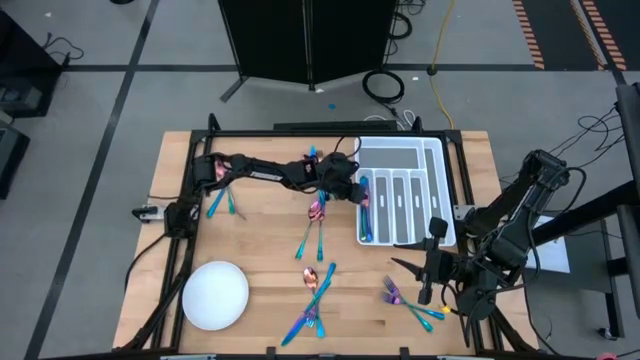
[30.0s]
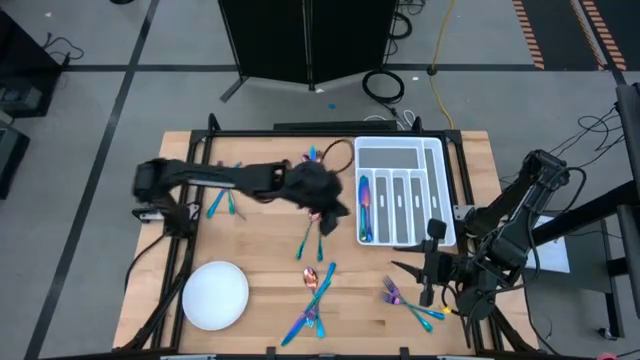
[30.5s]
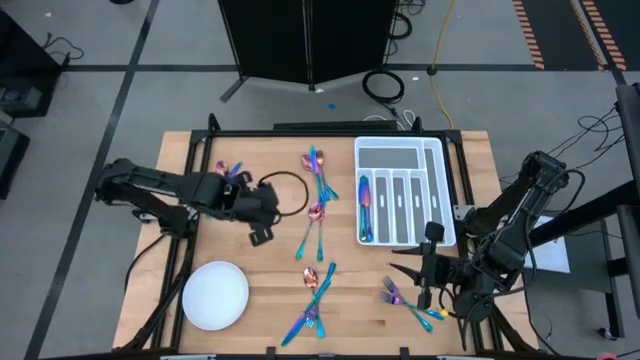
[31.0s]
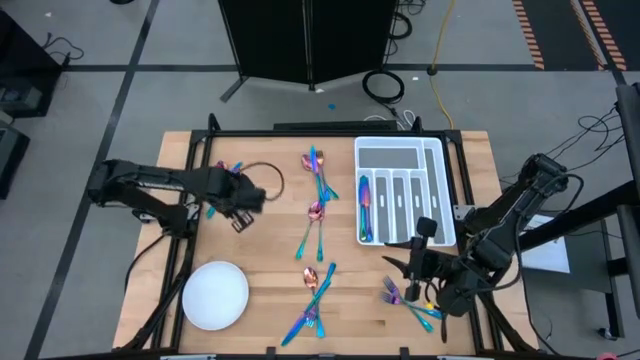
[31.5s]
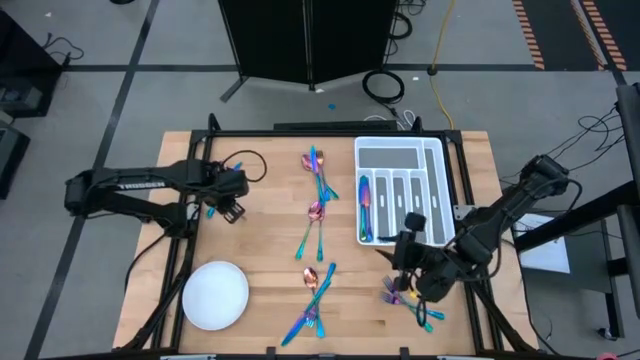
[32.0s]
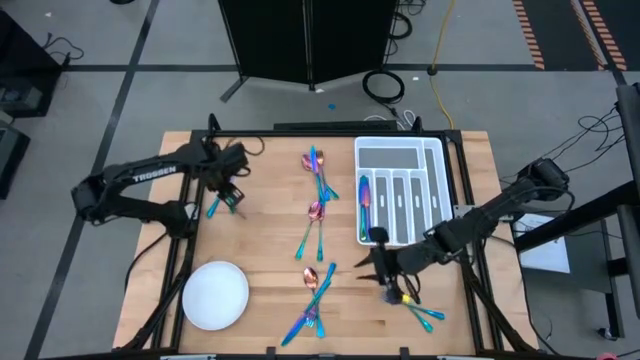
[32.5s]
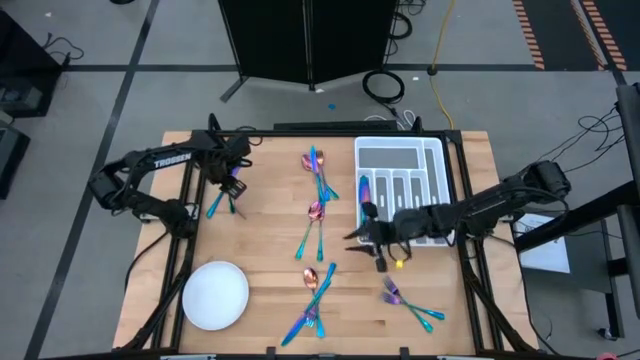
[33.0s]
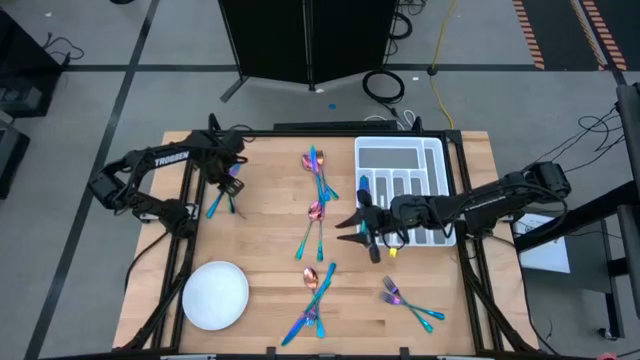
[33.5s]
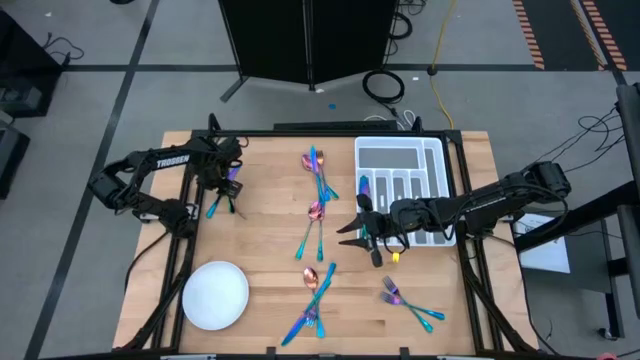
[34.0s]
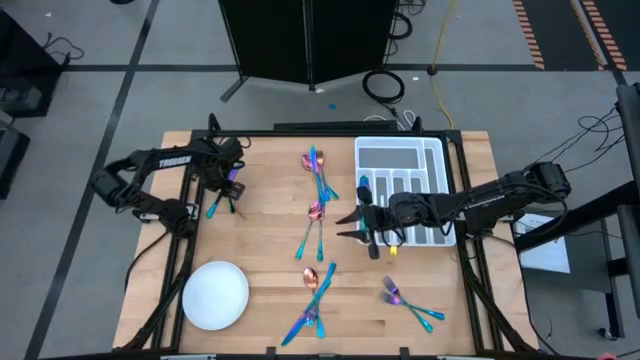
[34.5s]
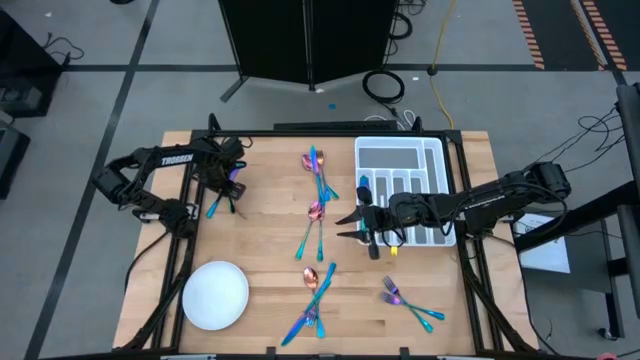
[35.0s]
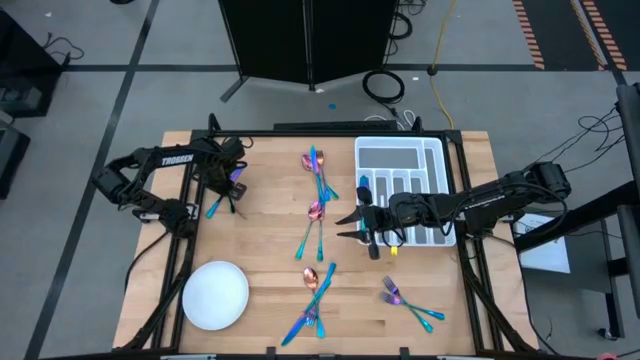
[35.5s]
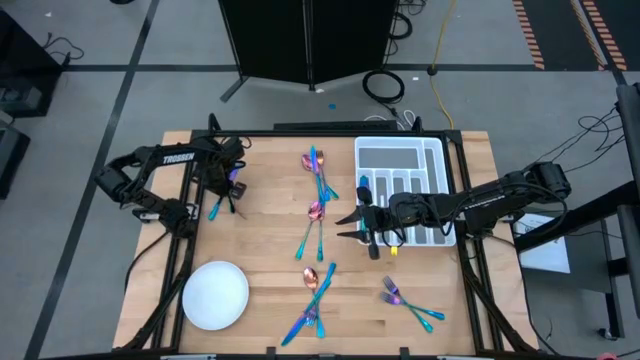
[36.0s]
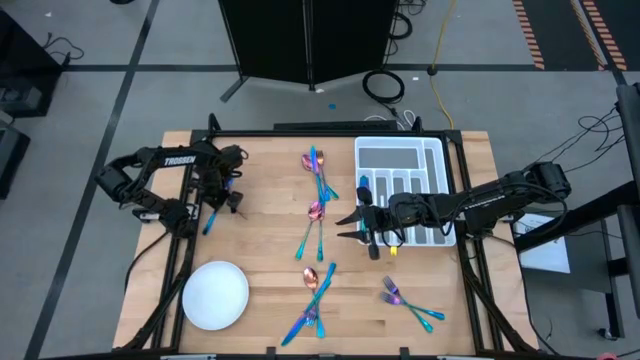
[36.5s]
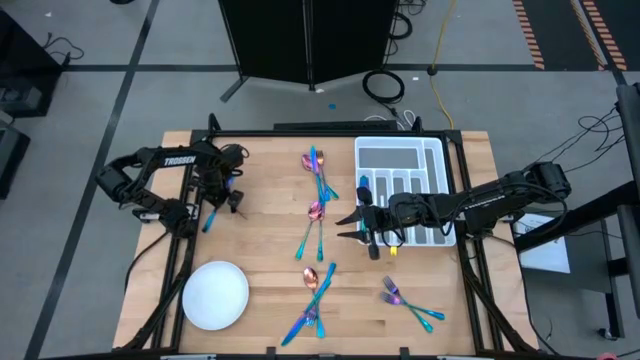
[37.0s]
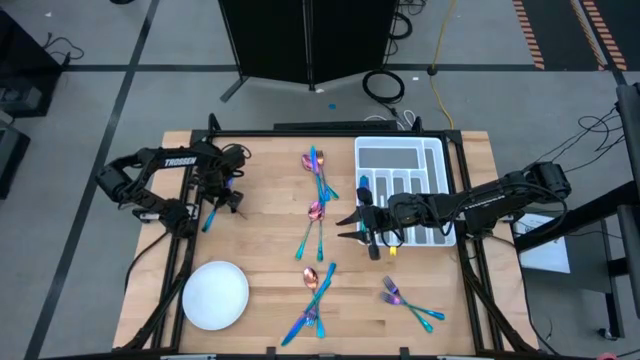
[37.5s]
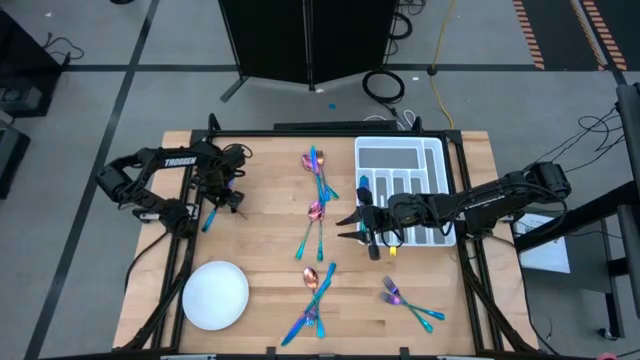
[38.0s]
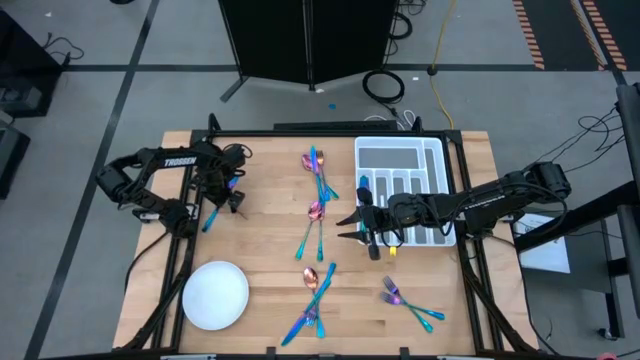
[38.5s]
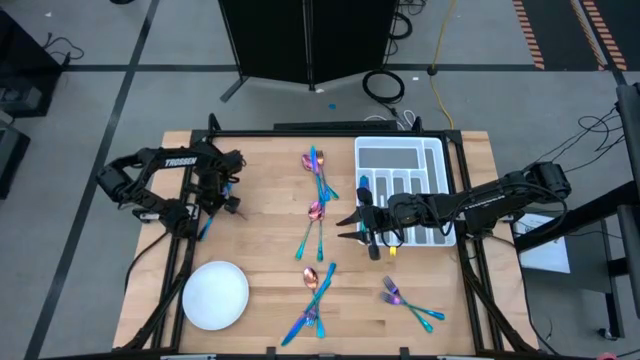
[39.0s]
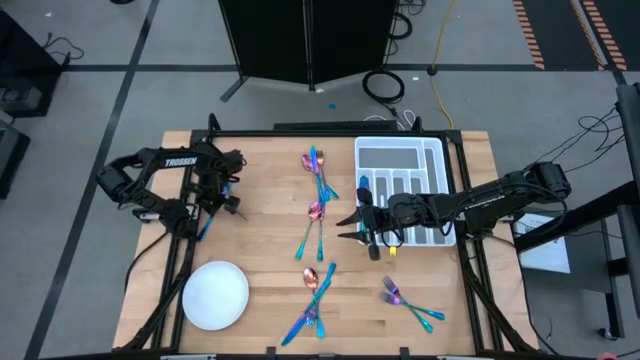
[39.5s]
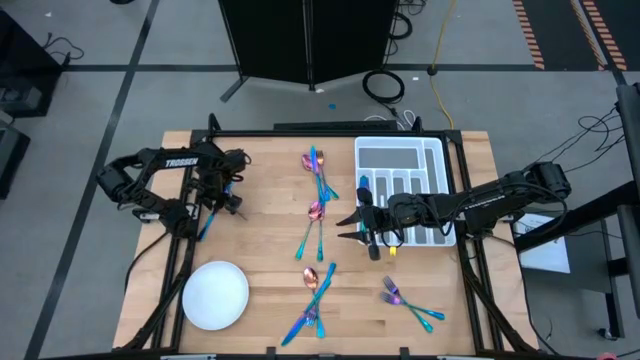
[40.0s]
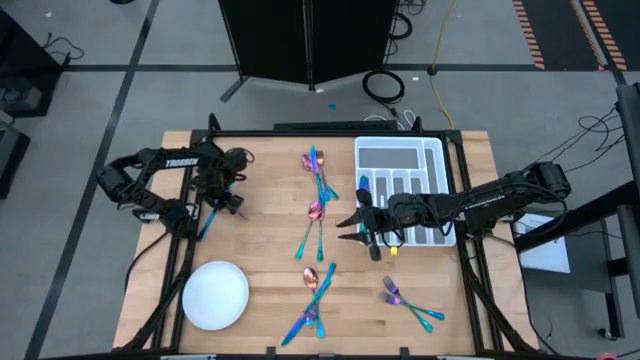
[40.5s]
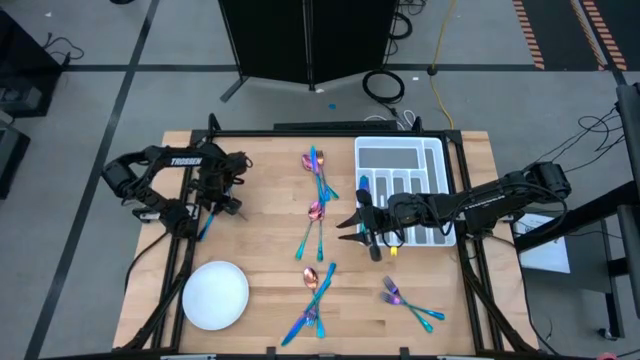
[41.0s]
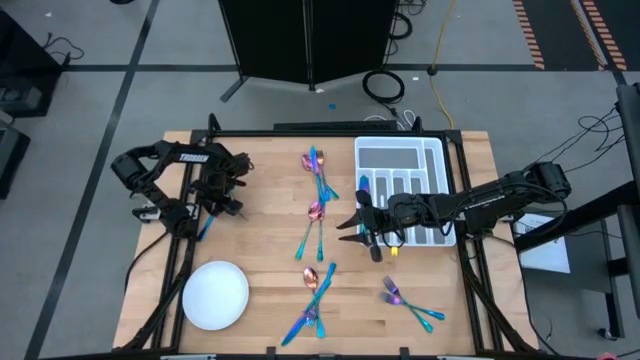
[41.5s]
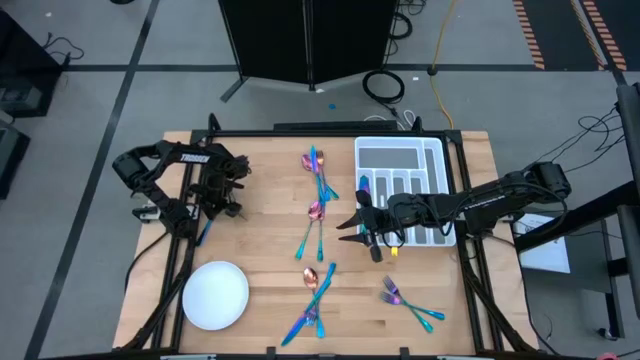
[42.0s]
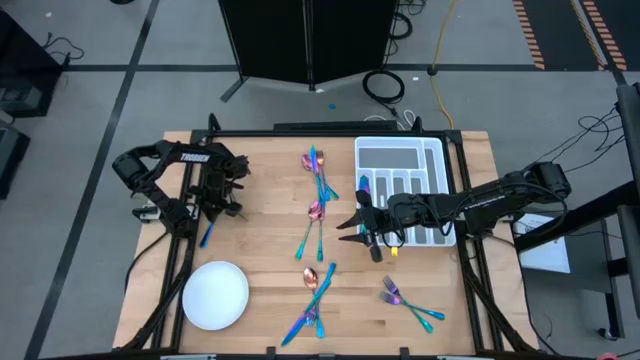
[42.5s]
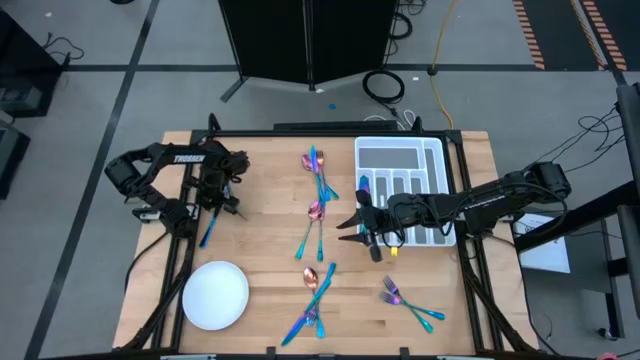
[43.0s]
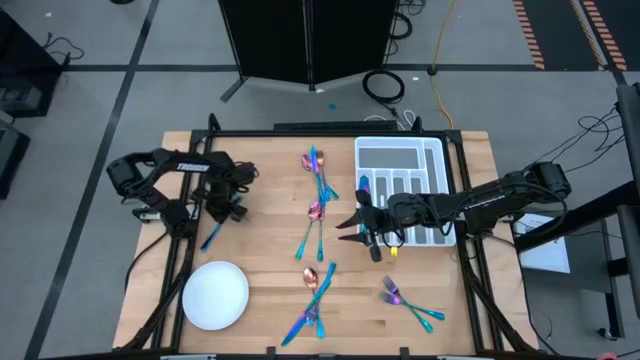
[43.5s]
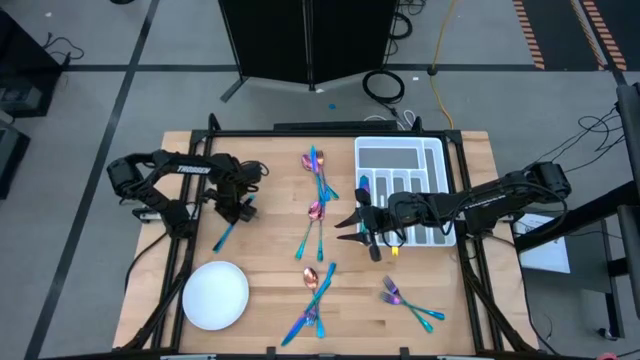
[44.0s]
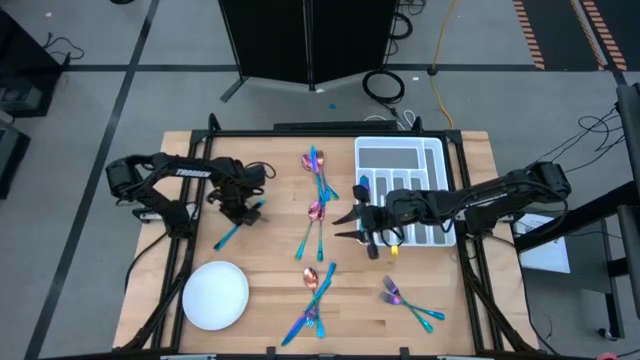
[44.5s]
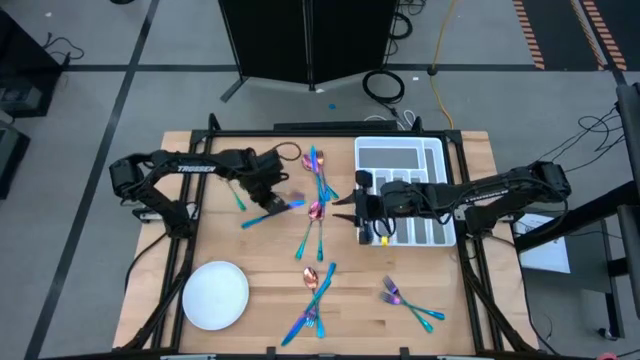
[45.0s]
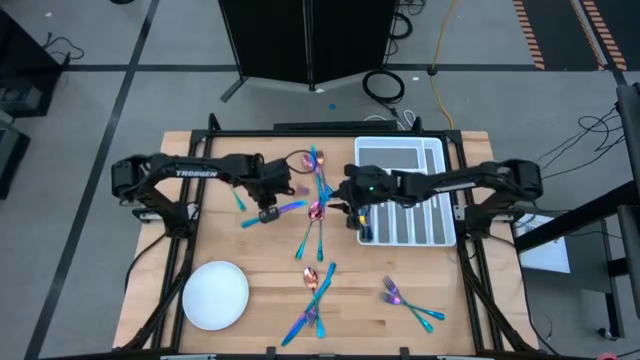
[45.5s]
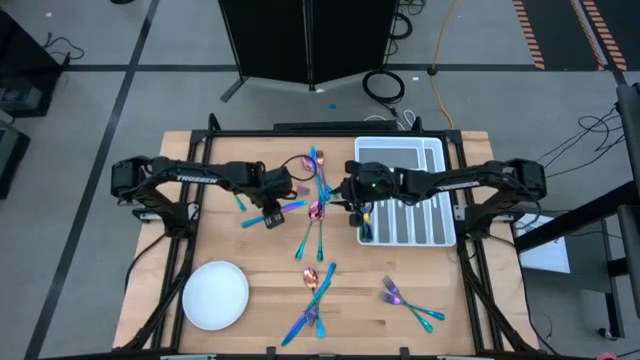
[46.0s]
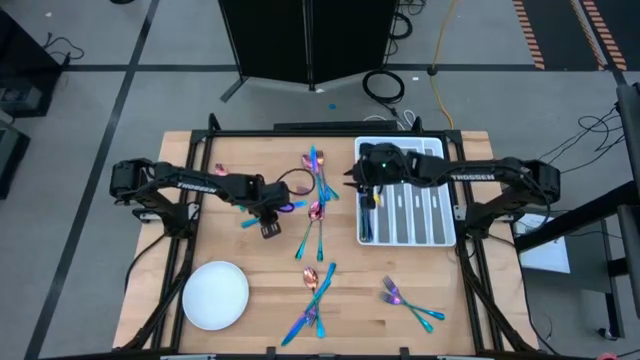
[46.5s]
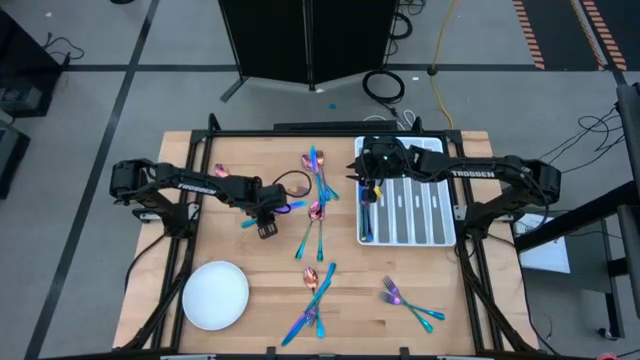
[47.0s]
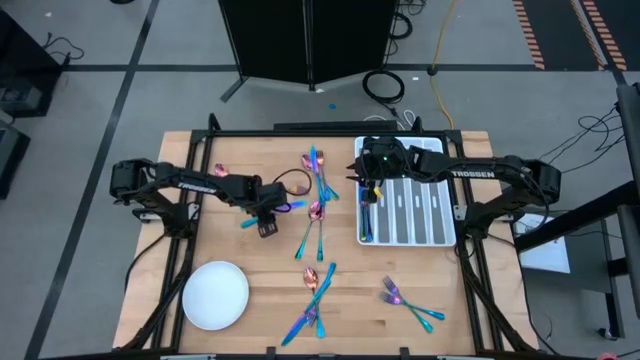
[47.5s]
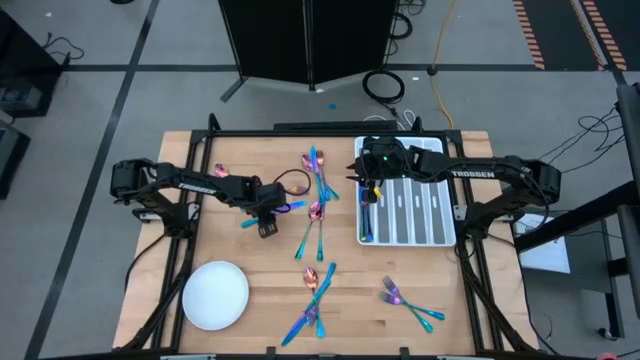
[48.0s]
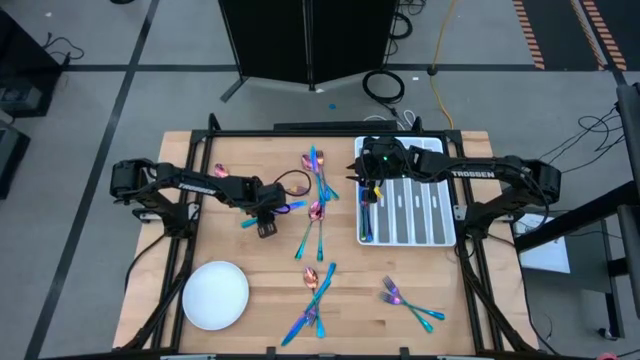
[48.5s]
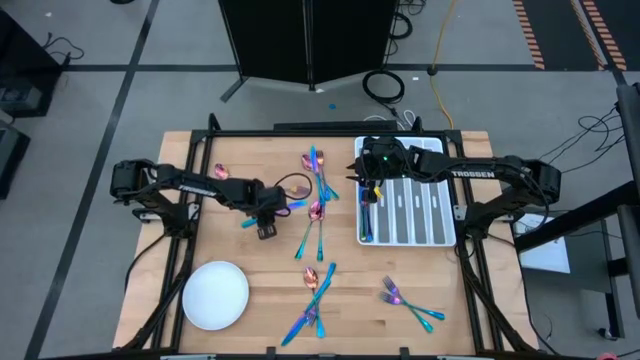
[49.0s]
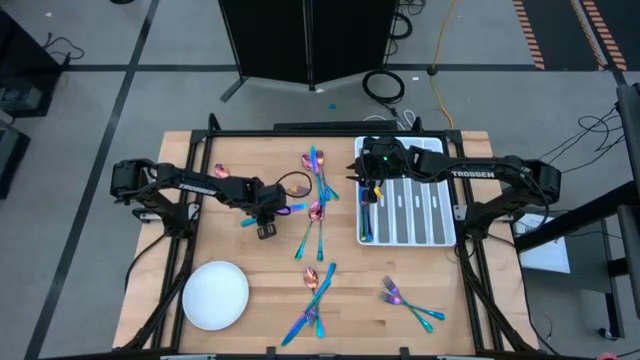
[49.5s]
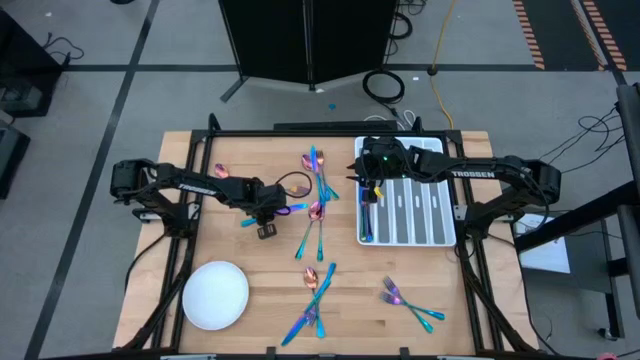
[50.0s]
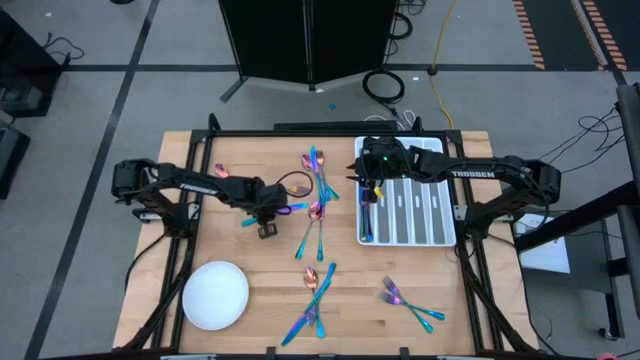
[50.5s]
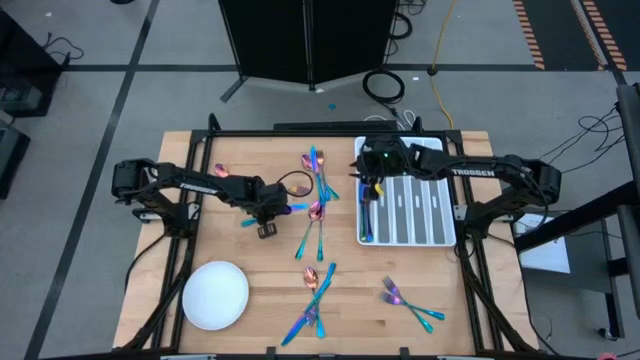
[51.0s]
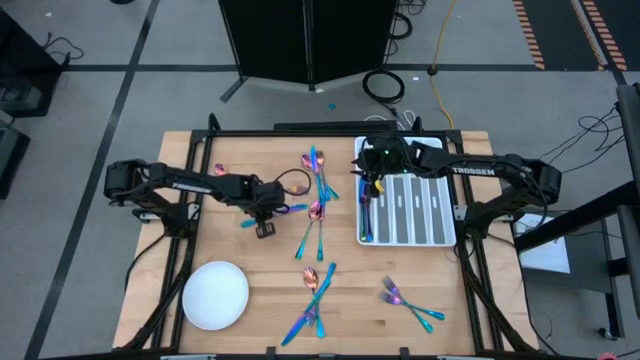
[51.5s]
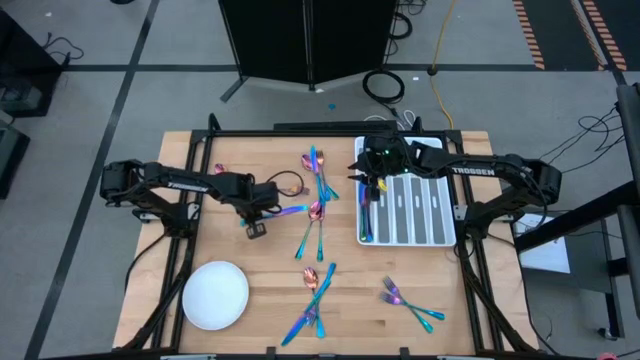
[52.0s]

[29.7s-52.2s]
Task: Sort silverware
Put the blue knife into the utensil organizer
